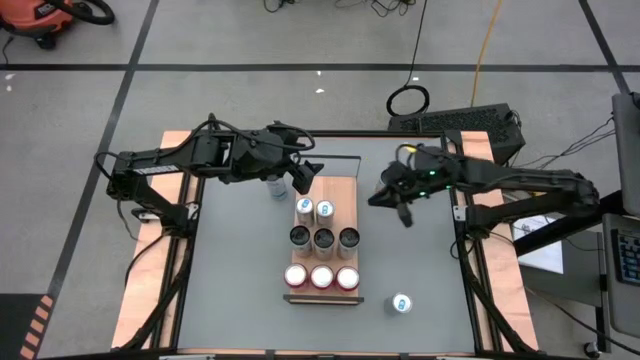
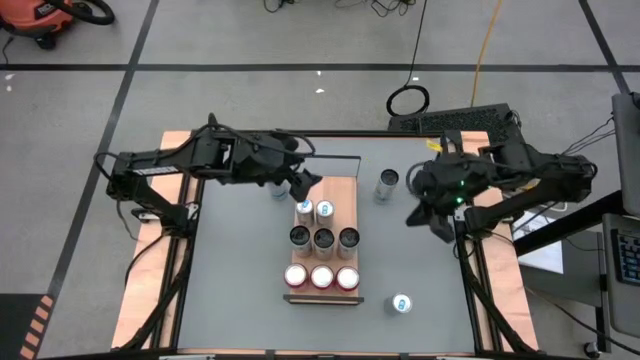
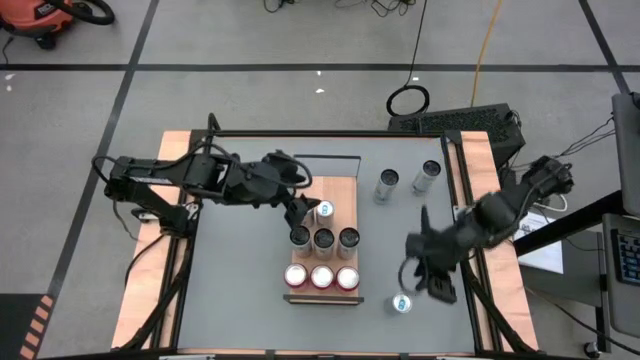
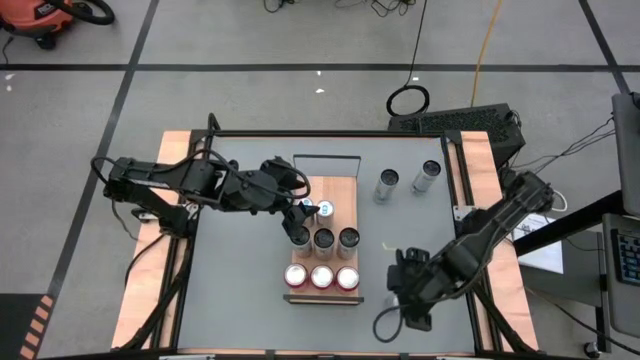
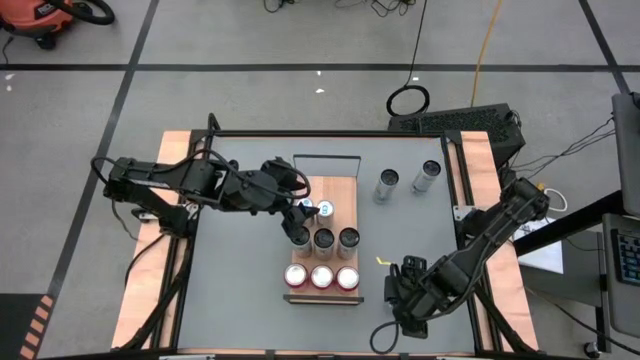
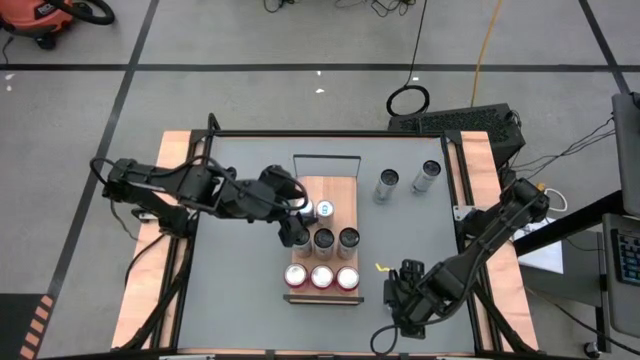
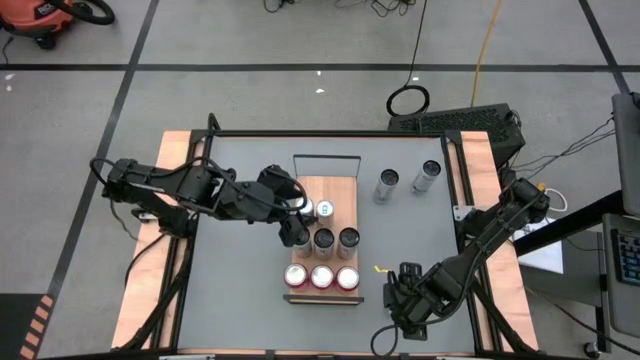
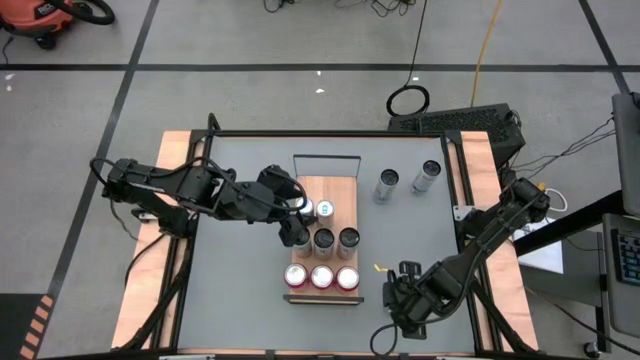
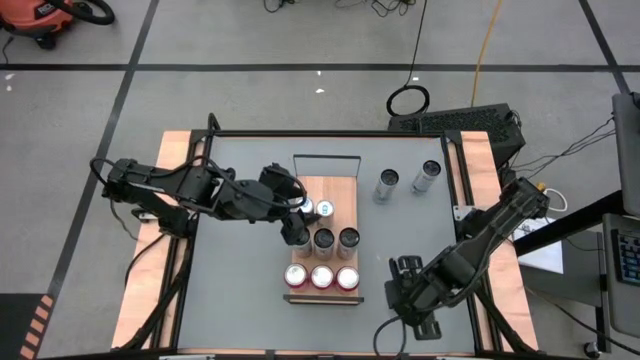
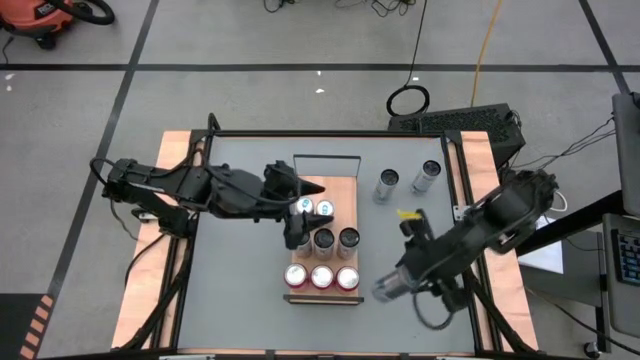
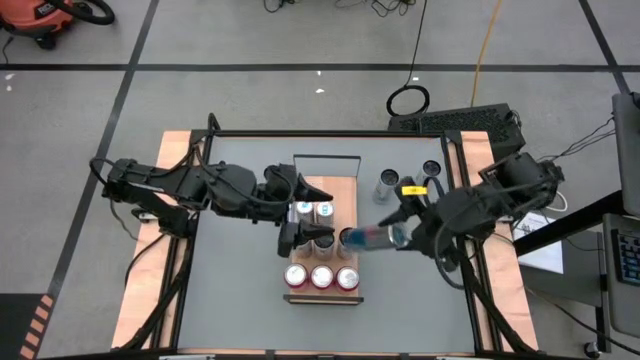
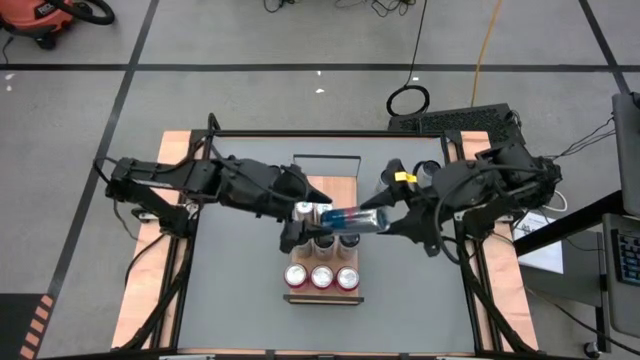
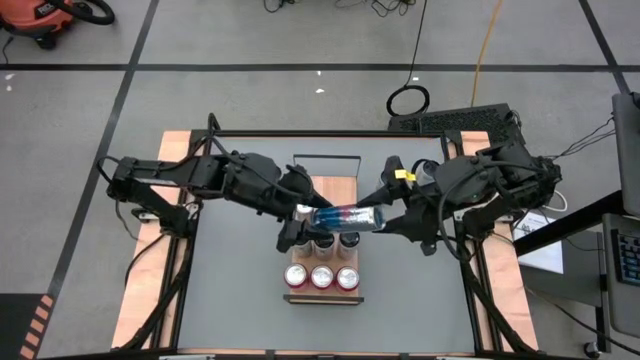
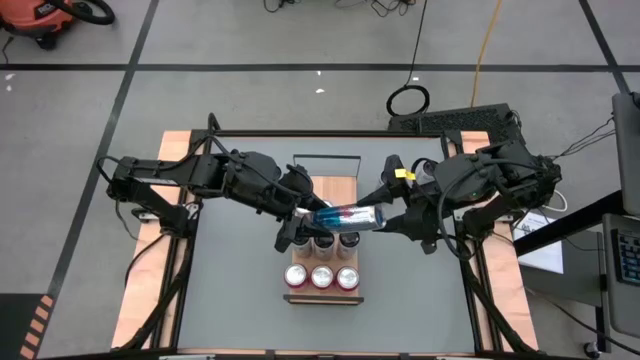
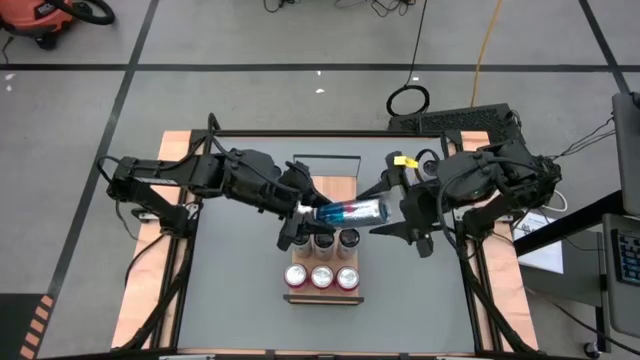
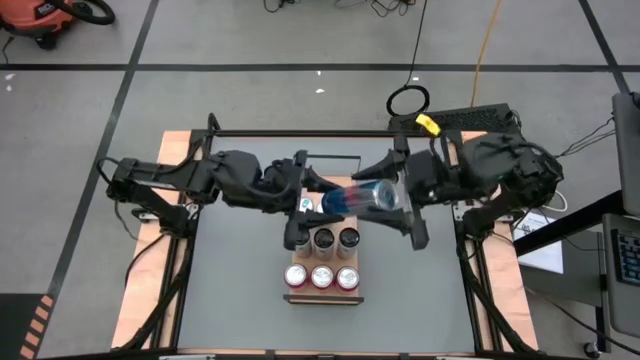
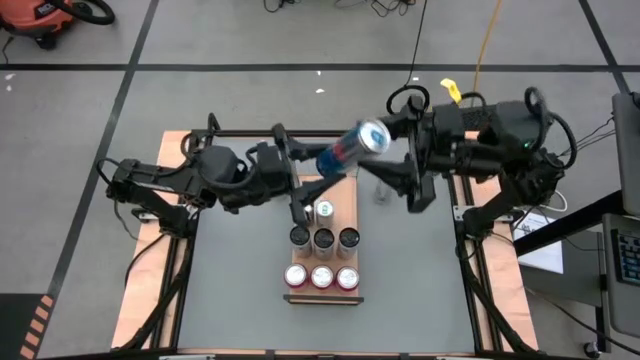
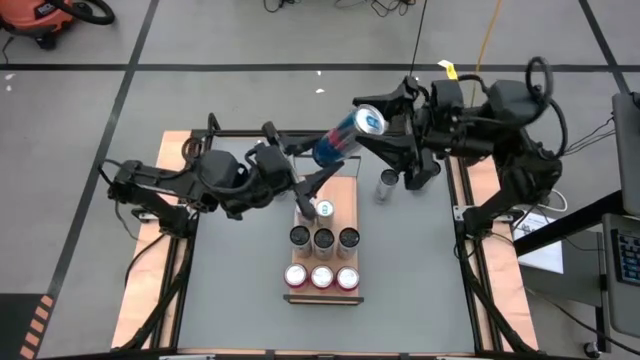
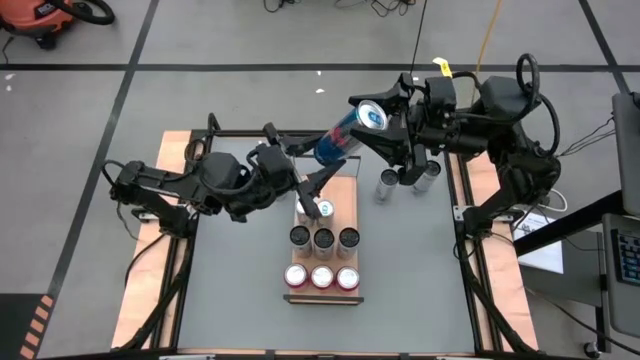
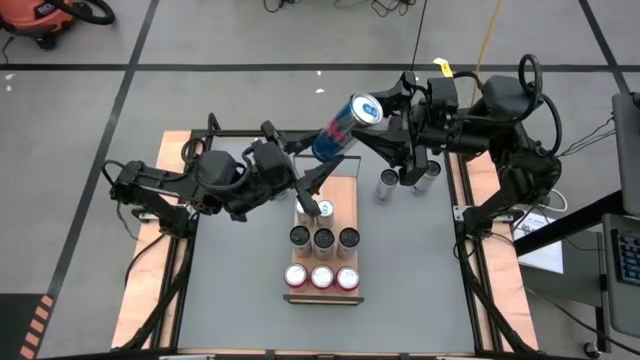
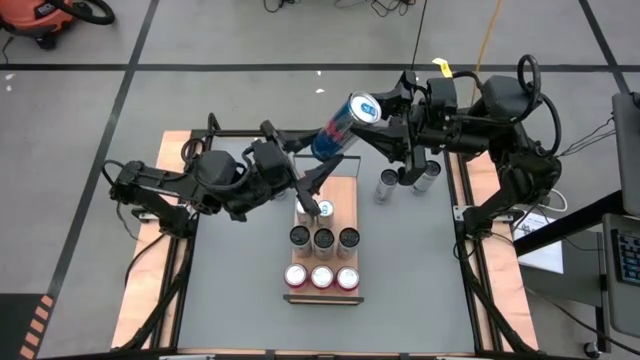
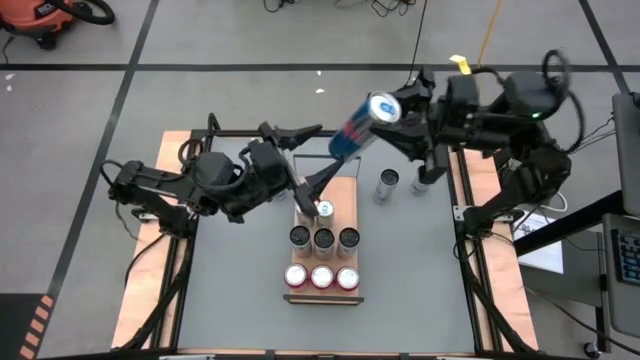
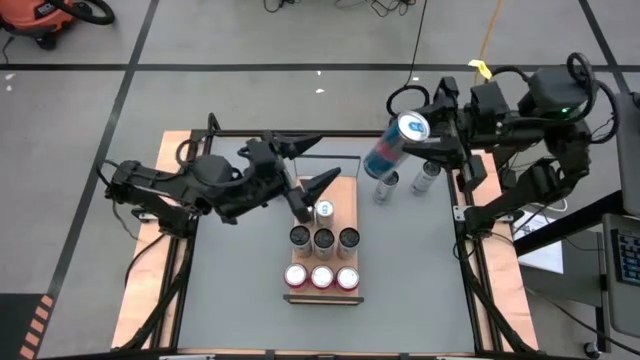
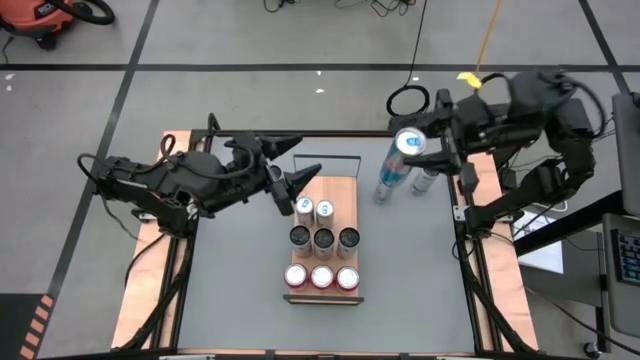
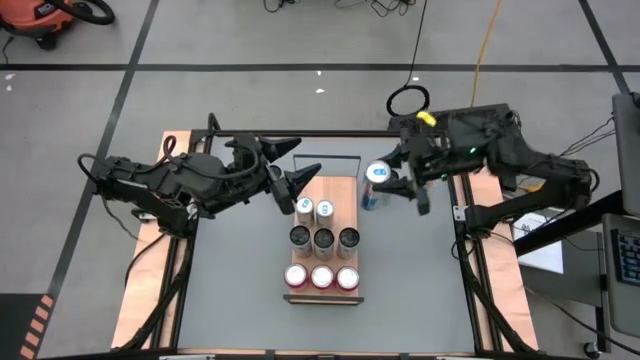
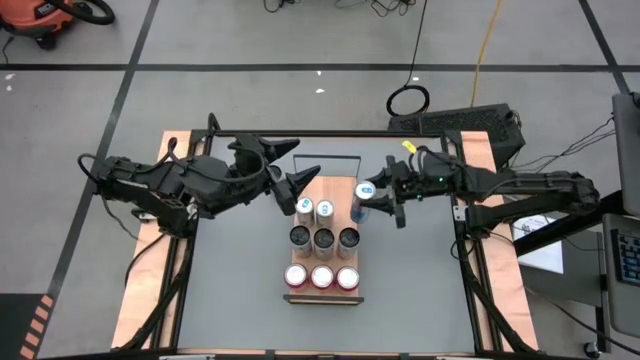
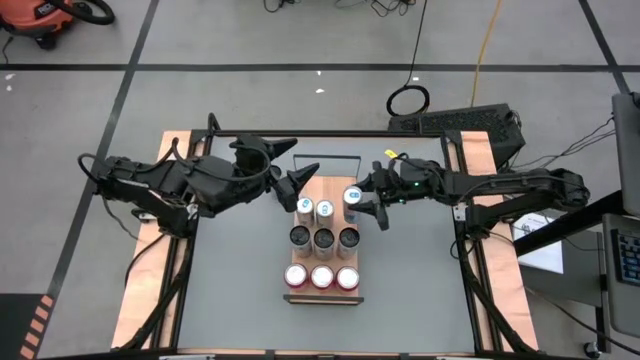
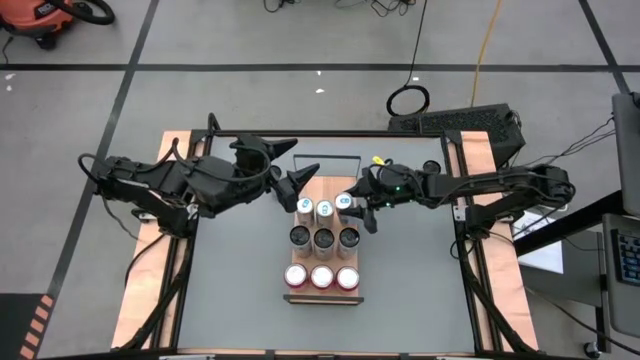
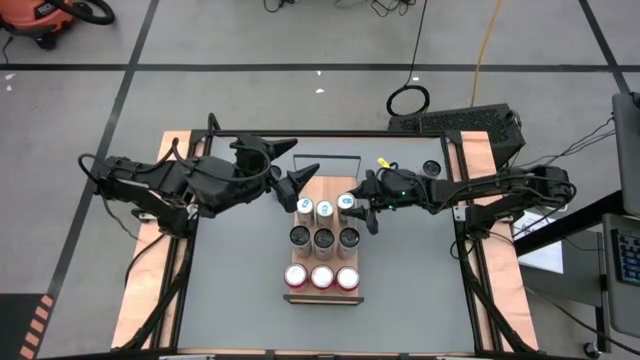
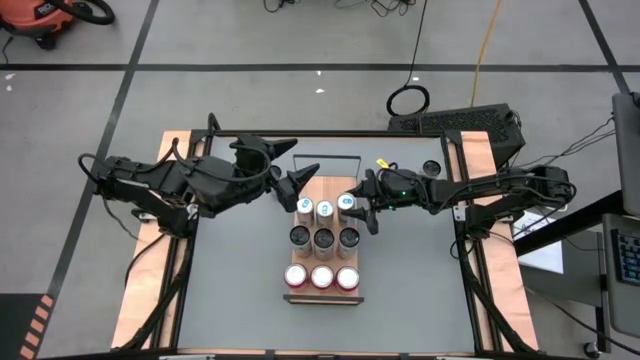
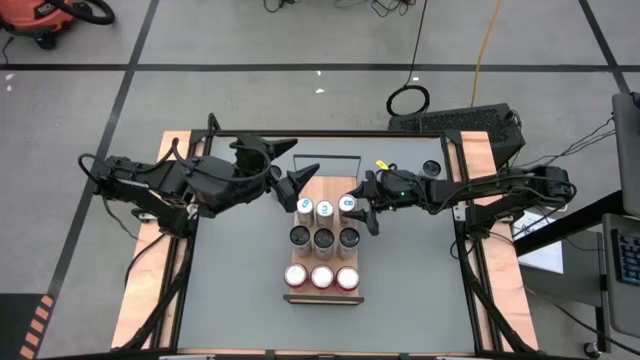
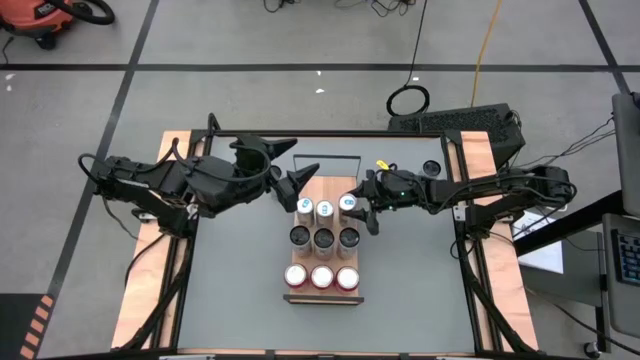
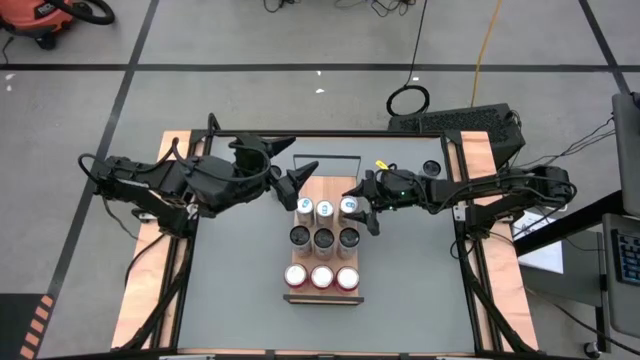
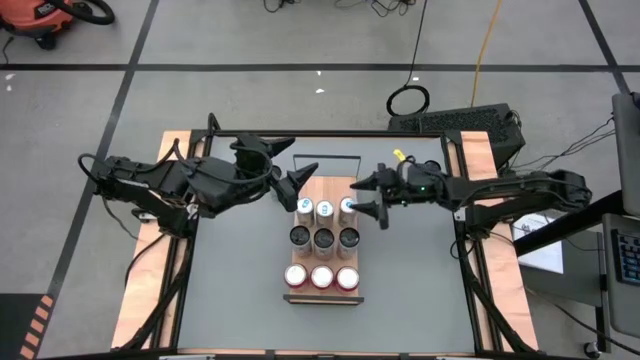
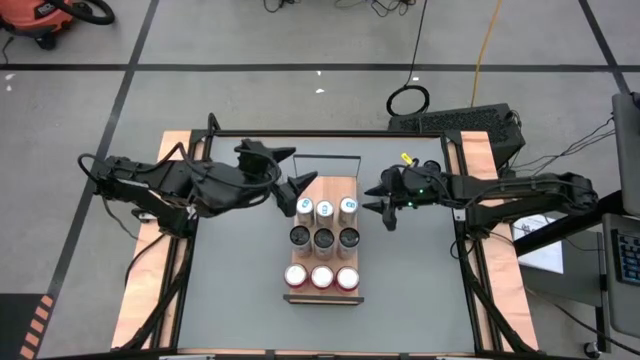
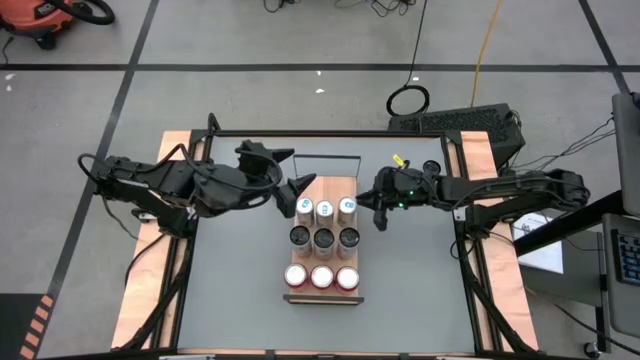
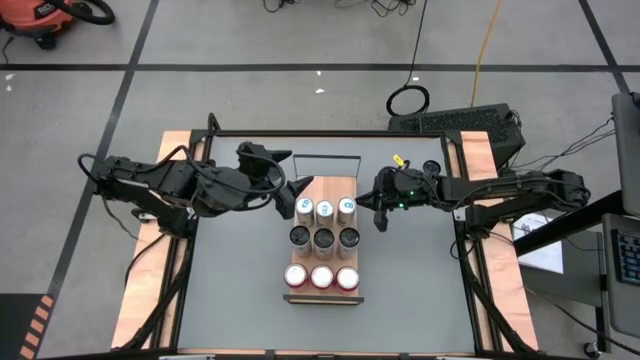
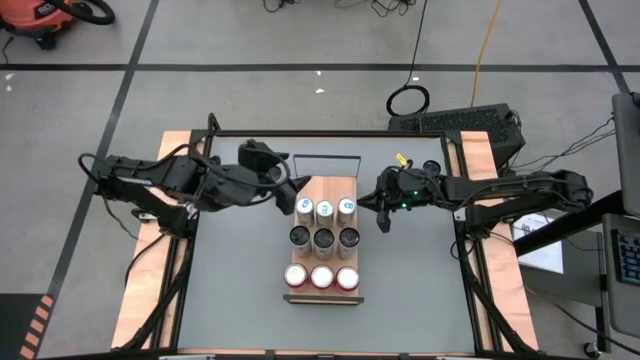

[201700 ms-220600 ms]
Task: Sort soda cans
Put the blue soda can on the shelf and align it with the other blue soda cans
